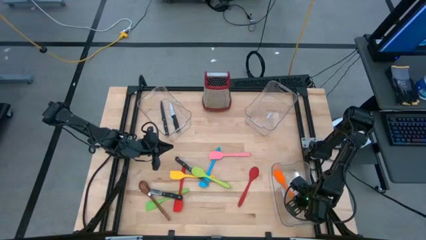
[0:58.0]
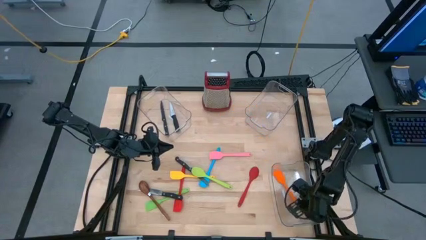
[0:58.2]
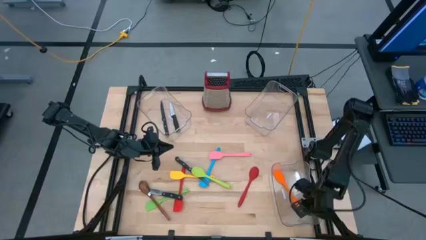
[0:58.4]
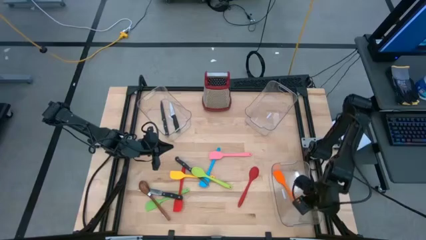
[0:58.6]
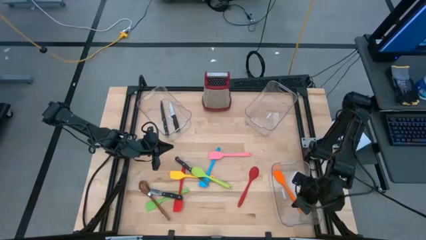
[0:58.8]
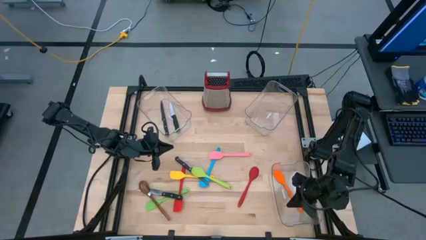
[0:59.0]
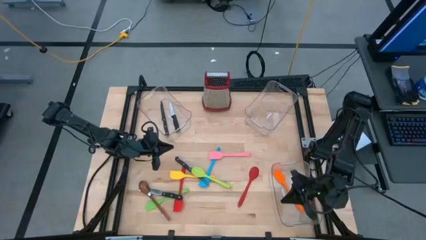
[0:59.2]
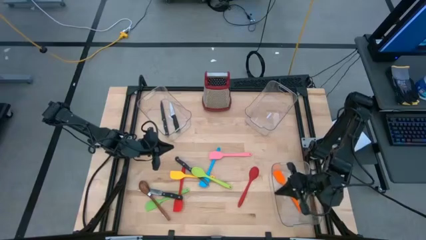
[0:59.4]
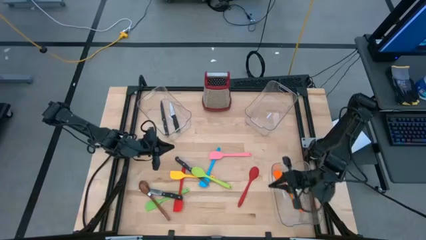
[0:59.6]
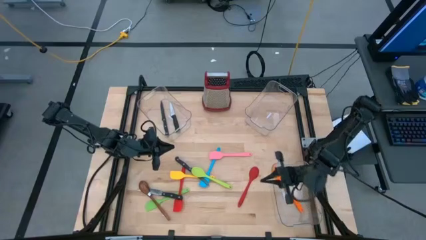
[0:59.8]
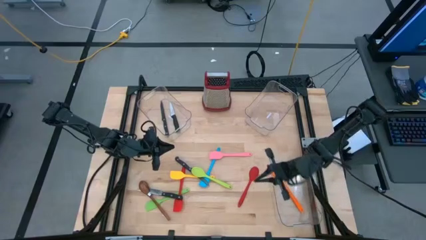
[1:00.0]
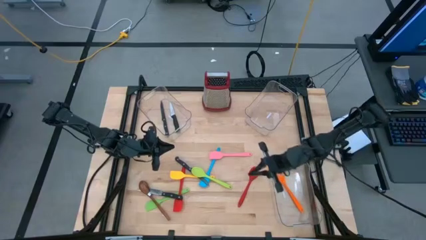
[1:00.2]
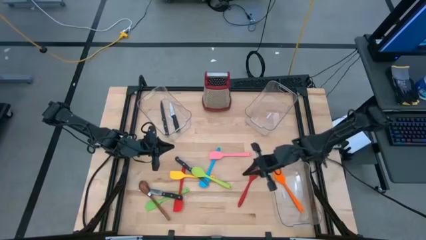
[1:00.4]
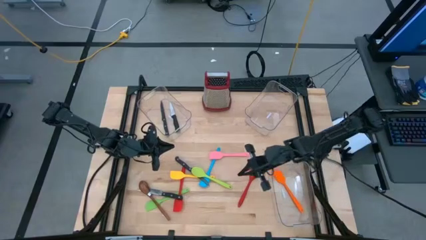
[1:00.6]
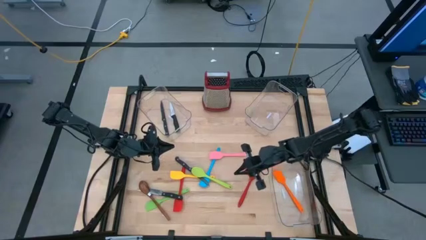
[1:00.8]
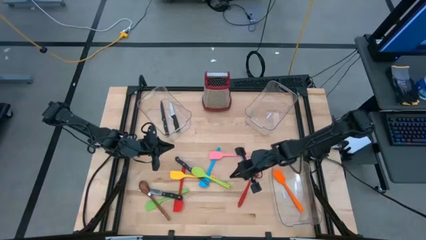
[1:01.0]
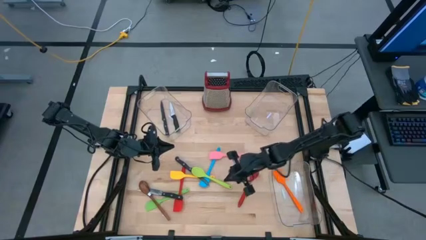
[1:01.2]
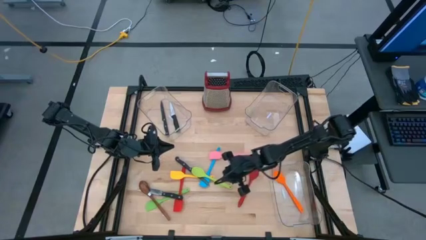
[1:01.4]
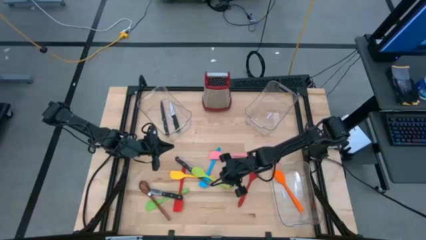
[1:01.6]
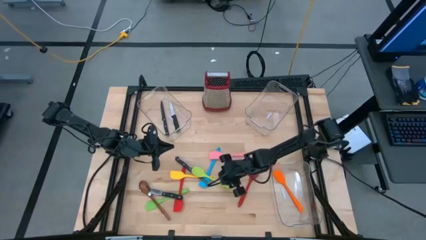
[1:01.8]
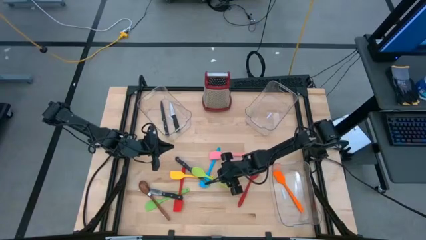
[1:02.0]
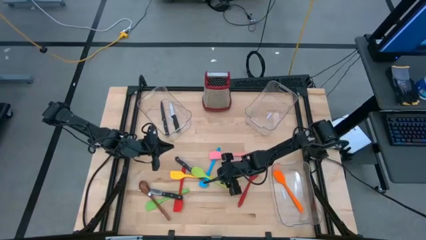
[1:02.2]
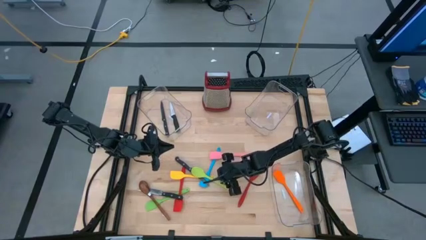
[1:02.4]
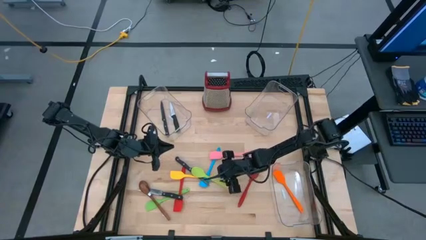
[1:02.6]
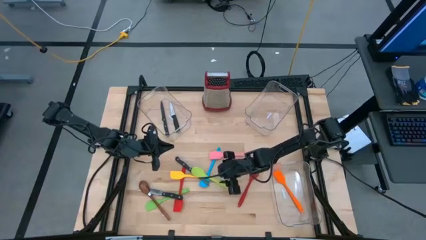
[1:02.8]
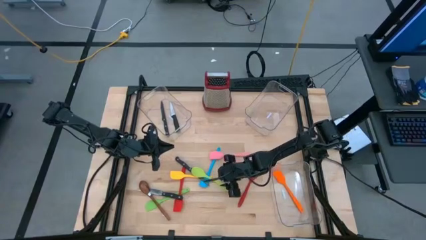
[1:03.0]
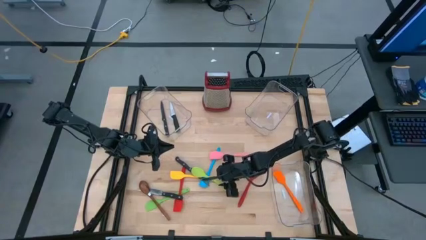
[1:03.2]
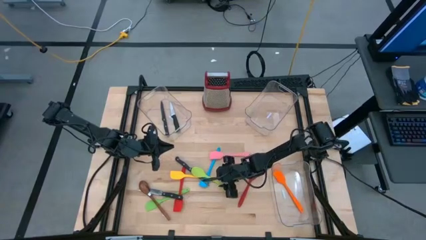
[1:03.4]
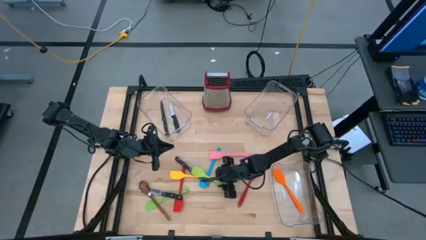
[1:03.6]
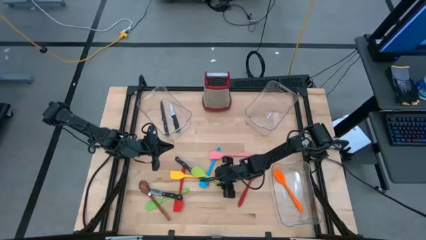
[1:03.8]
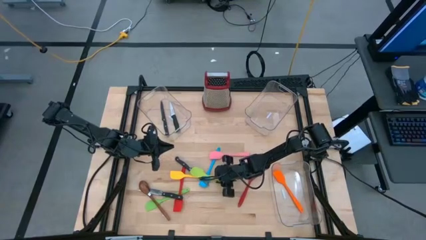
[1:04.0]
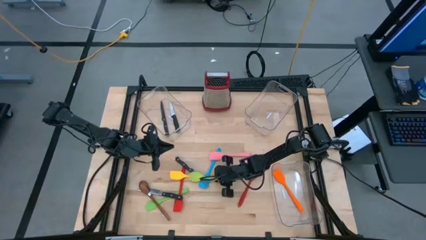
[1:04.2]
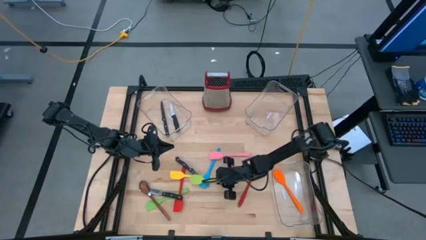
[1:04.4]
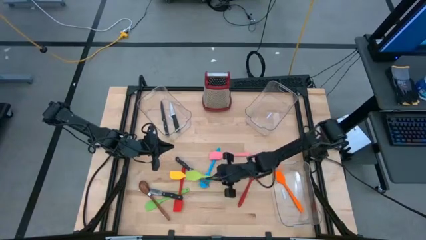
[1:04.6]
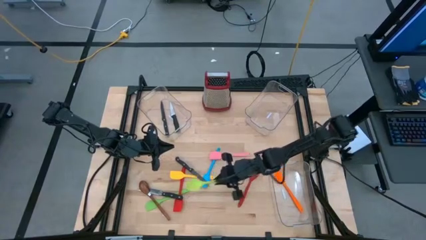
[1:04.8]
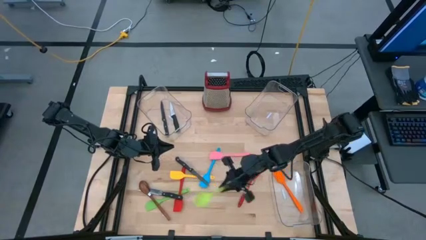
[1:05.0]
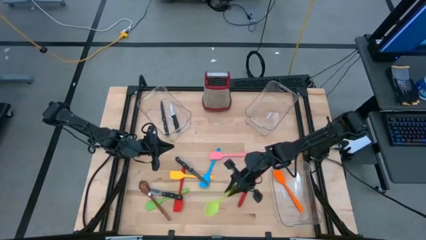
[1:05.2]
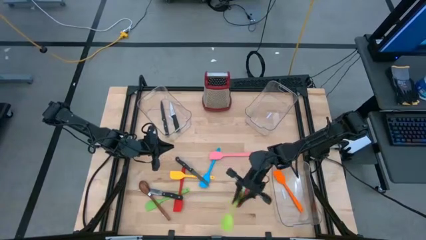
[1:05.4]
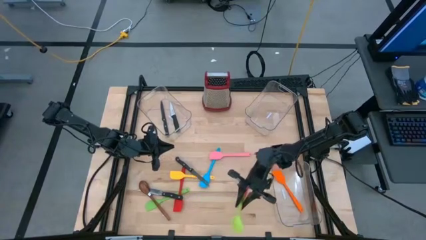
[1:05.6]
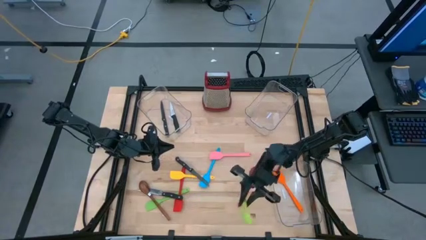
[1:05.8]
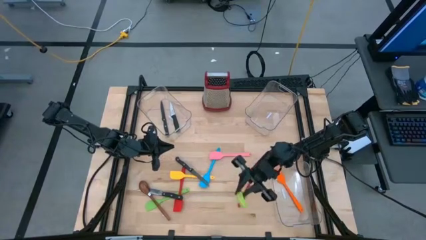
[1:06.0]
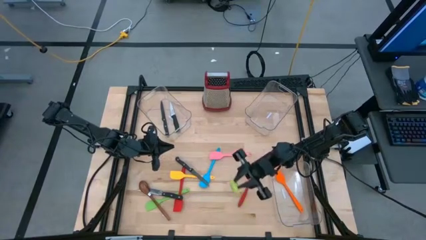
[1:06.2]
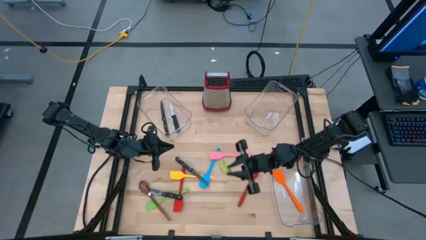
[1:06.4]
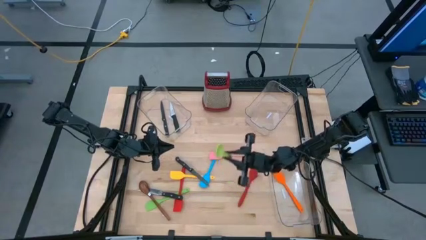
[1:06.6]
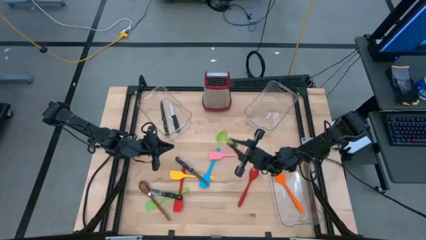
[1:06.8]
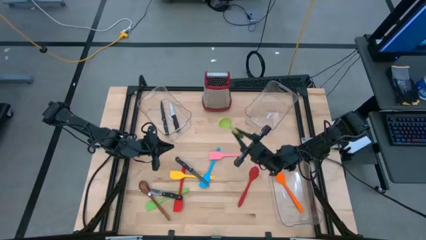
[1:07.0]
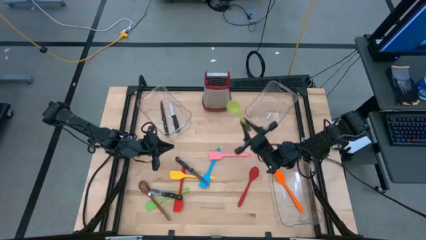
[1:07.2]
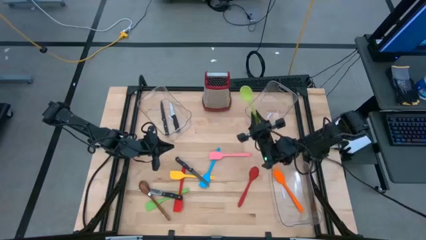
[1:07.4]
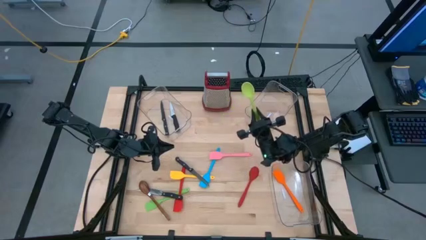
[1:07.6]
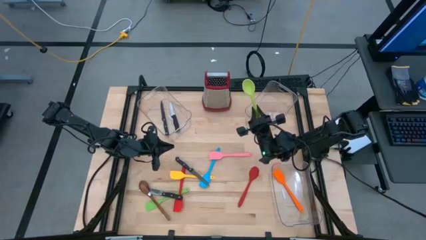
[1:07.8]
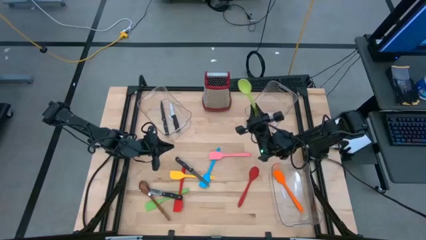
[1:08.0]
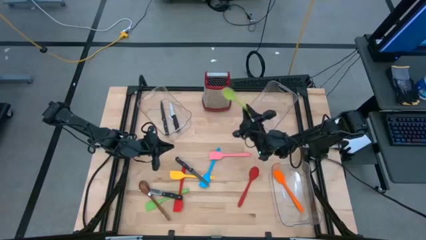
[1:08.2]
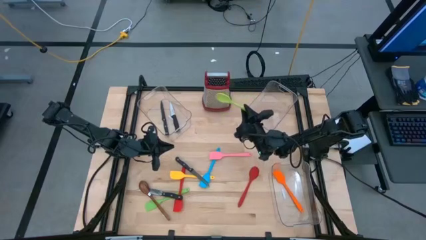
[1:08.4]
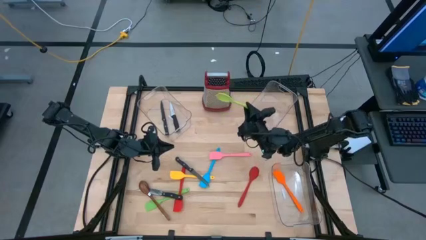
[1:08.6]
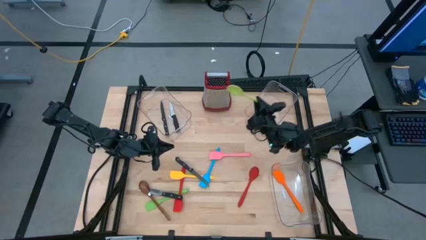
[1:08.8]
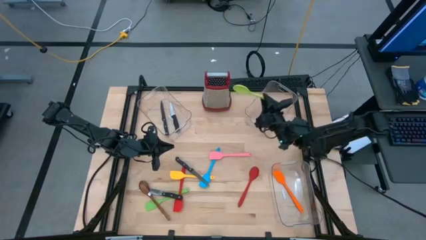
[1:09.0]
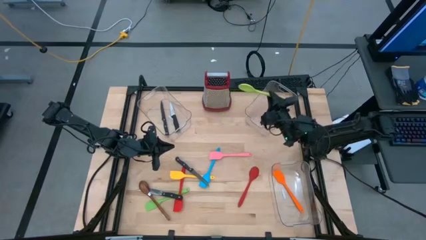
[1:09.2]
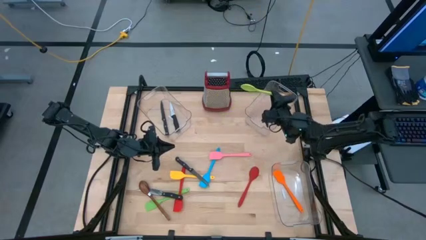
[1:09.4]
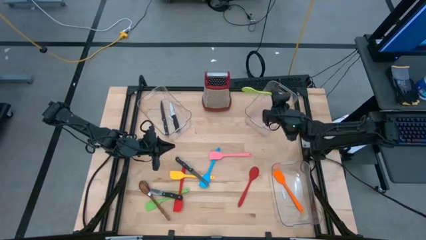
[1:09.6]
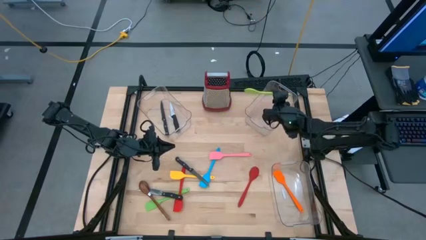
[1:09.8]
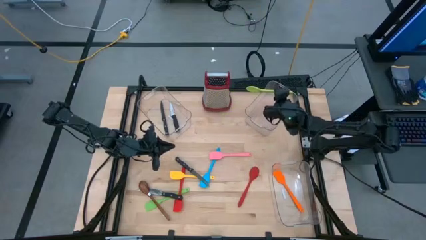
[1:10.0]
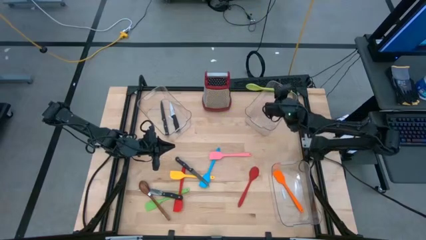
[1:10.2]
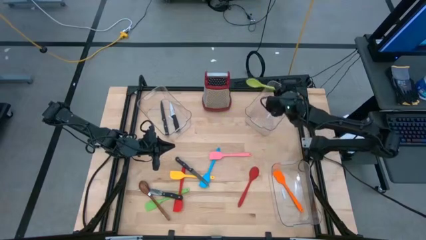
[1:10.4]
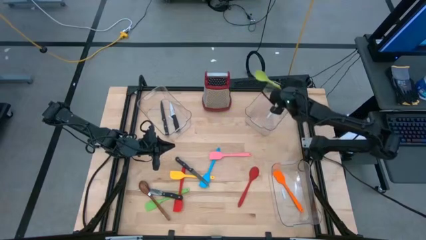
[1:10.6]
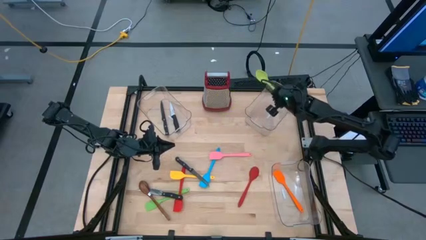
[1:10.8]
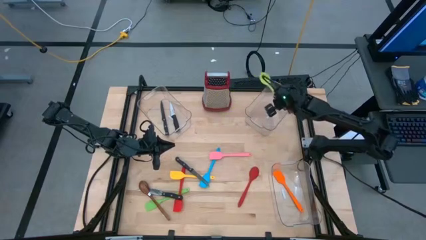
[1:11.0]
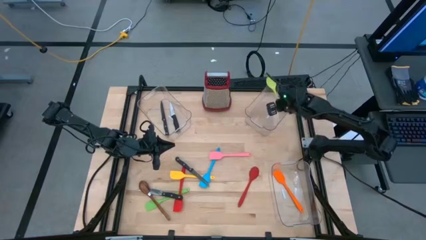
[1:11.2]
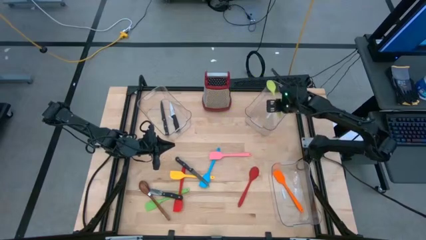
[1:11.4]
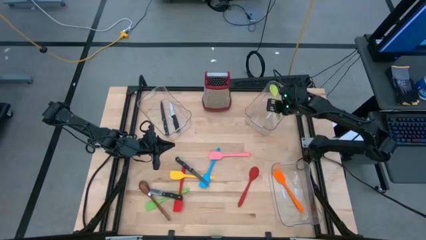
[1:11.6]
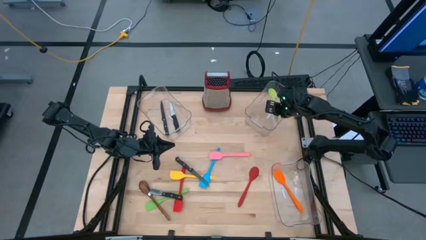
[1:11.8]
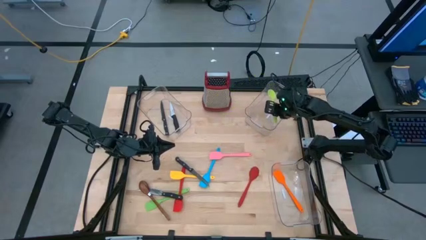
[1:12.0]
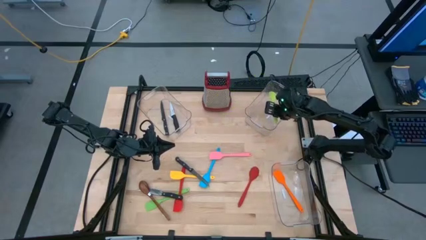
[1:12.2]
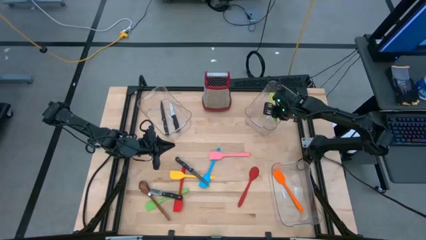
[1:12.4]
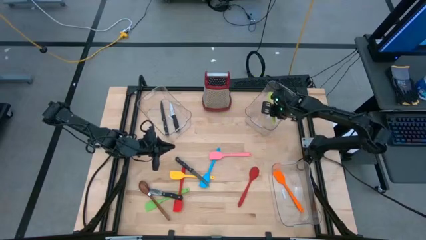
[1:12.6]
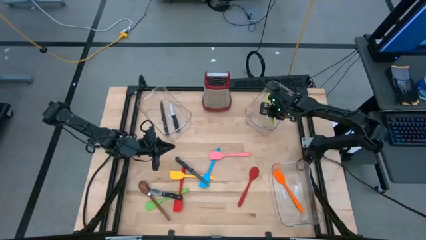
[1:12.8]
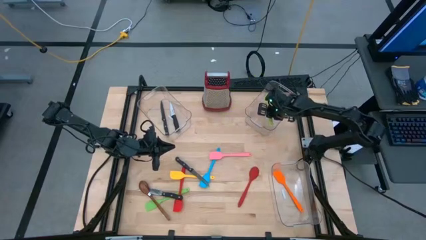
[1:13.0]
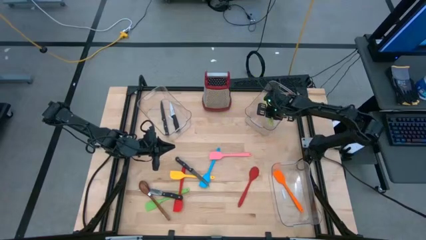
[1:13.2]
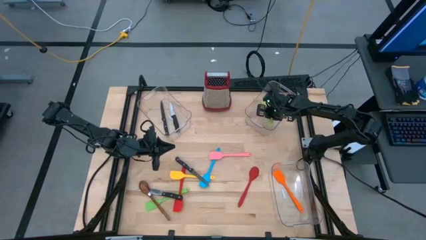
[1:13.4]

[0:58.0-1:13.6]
Task: Pick & Place Kitchen Items
Put the green serving spoon into the top right transparent bin
